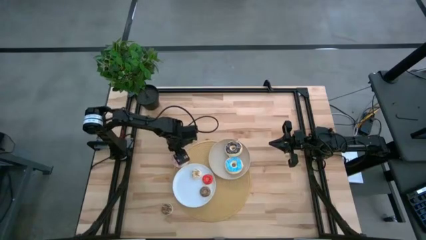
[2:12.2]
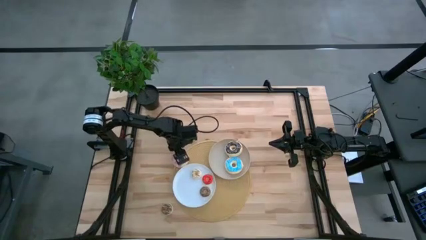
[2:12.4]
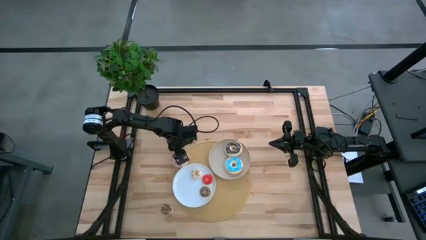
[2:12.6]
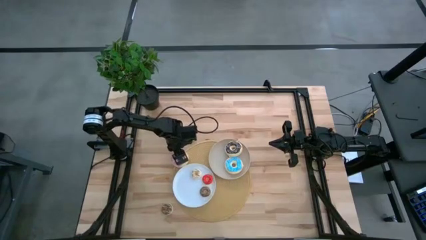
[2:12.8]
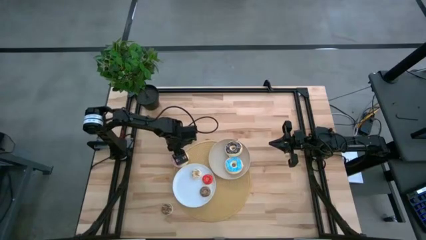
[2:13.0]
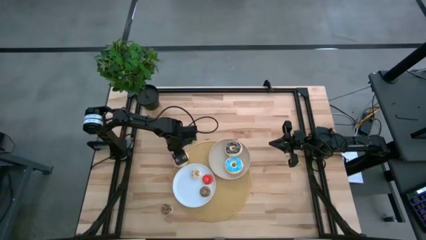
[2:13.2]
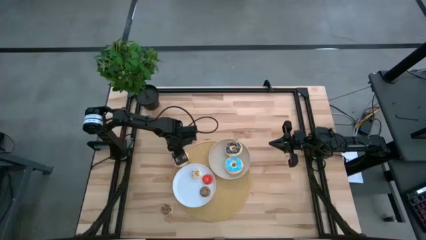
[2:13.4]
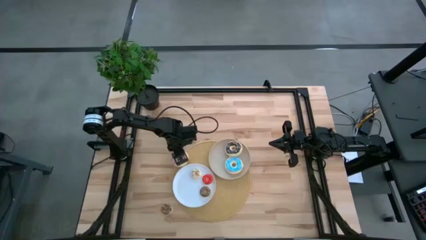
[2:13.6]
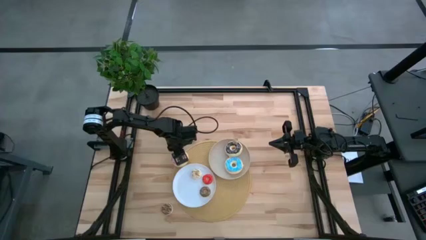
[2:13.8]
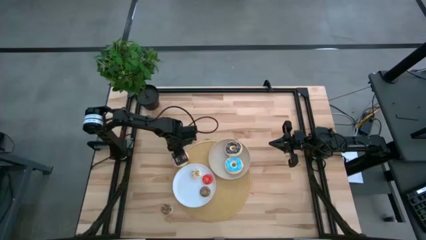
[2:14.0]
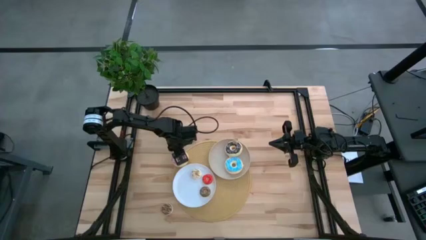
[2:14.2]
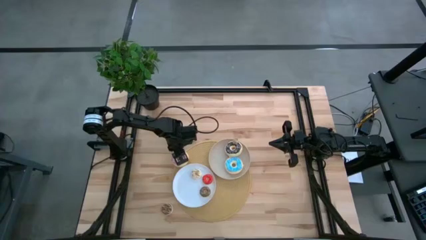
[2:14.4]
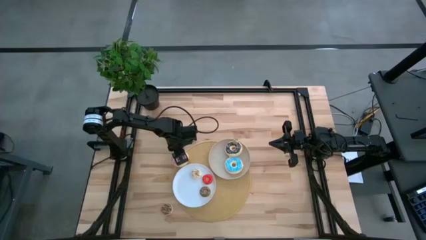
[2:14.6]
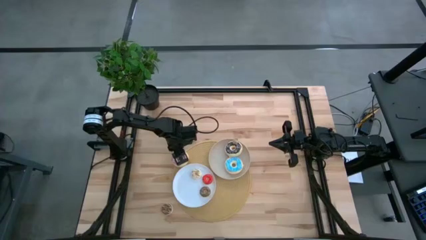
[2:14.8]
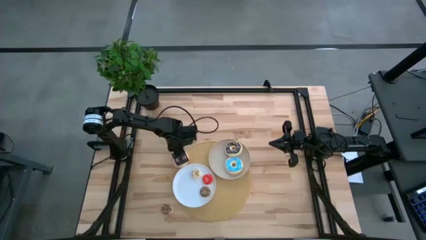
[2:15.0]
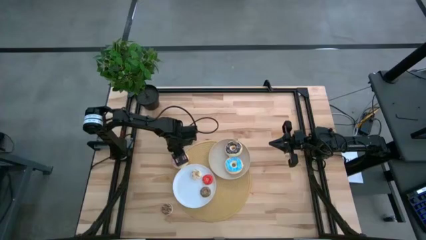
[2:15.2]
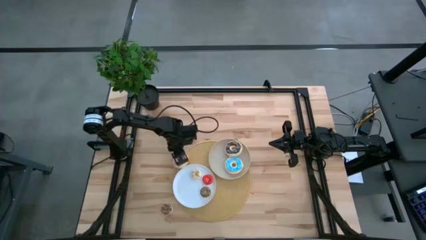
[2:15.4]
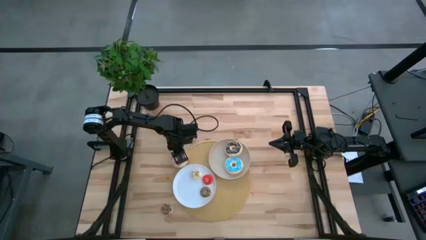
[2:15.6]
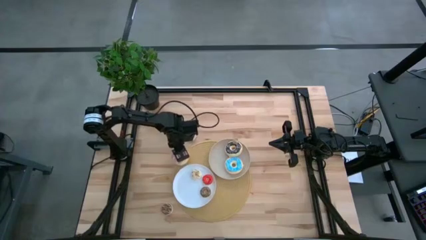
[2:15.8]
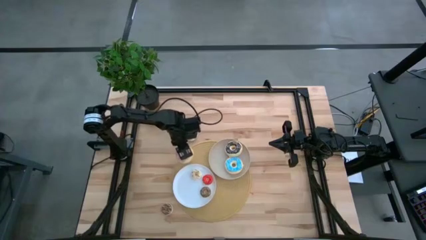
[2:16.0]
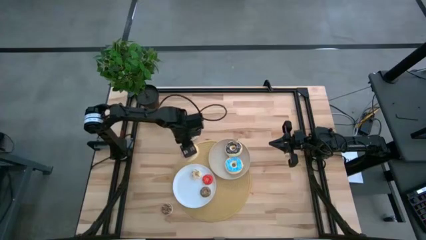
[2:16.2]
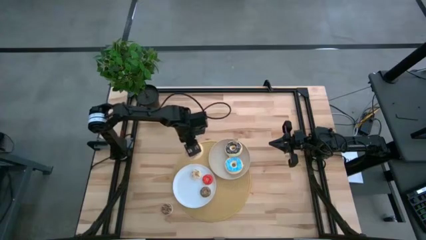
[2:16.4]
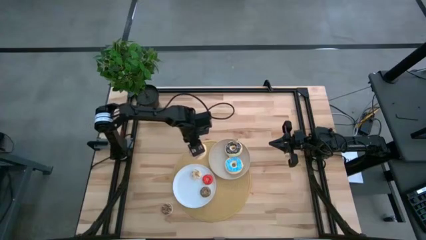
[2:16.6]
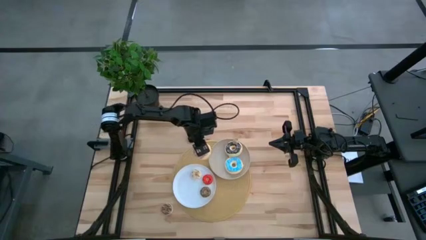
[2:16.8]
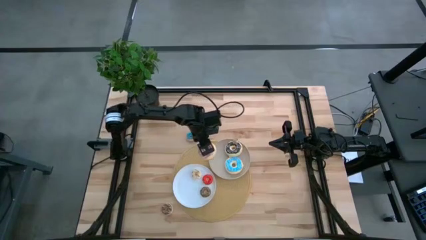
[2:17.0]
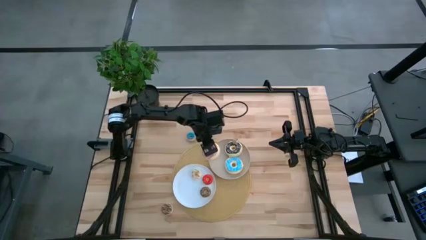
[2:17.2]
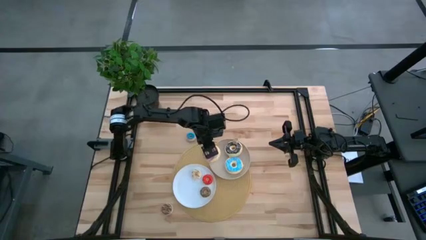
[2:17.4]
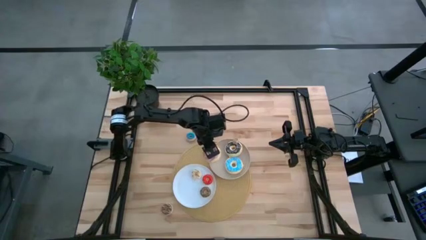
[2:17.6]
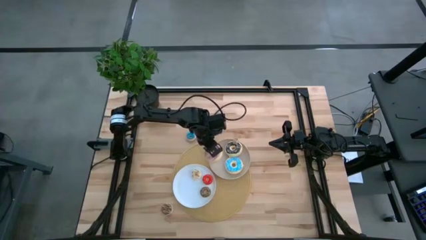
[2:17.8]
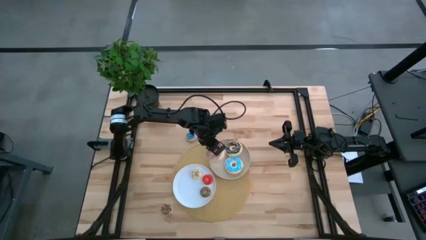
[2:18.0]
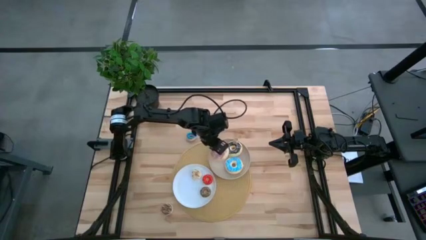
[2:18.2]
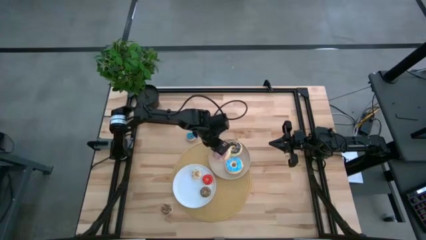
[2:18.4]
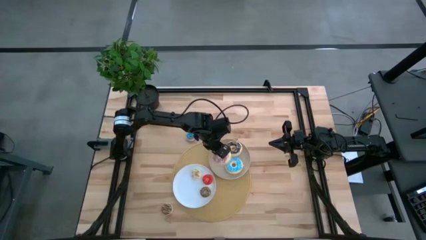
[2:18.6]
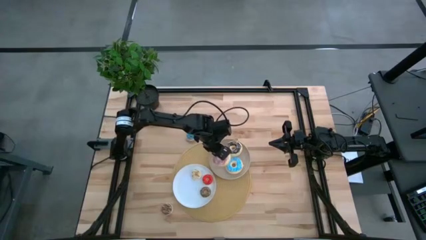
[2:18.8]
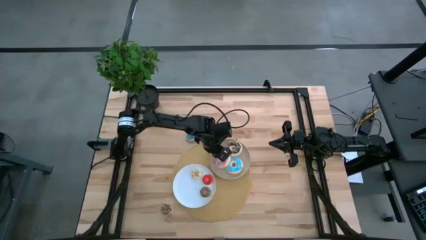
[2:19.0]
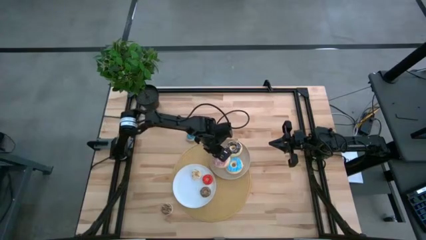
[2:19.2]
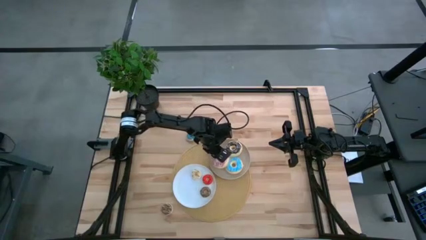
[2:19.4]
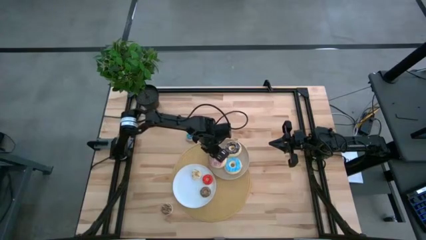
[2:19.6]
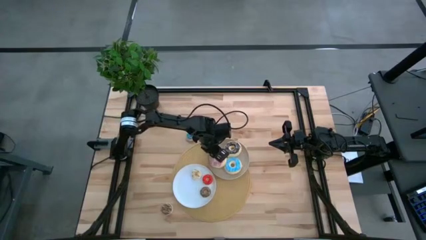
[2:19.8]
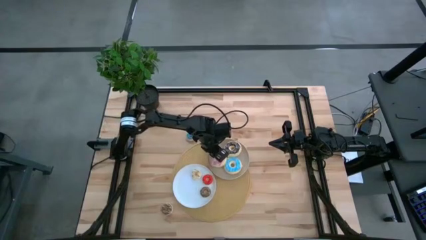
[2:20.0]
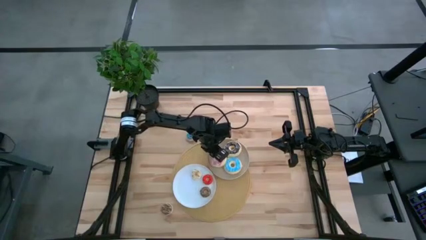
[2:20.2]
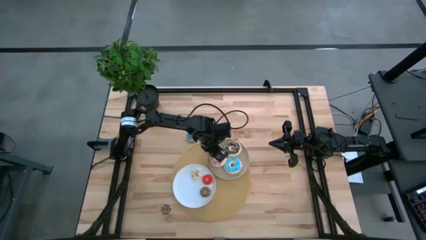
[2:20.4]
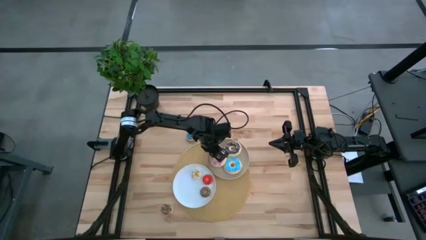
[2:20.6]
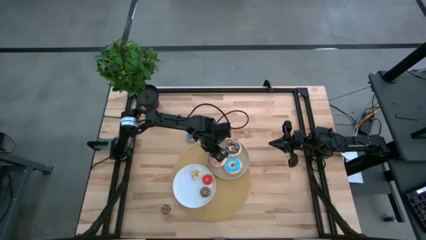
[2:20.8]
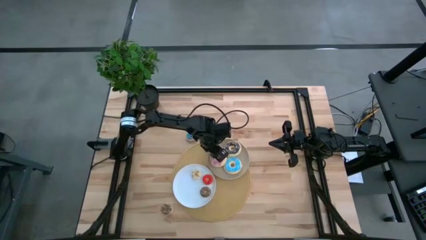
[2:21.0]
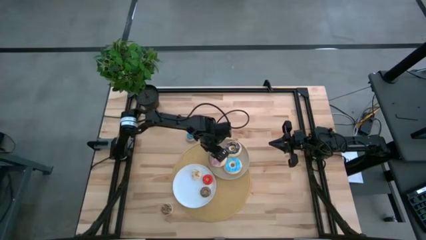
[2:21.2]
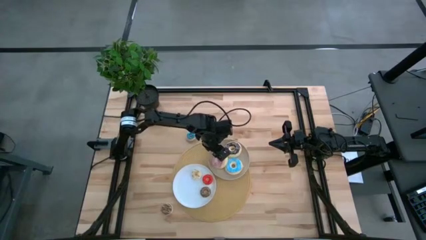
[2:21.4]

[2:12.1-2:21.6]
Task: Pick & Place donuts
Put the large pink donut on the gray plate

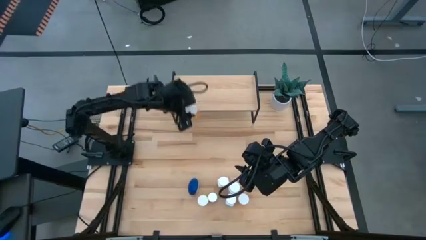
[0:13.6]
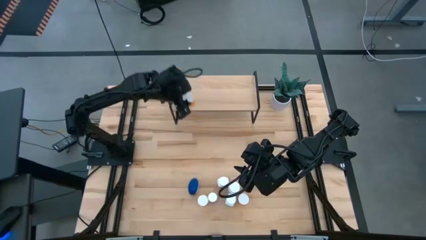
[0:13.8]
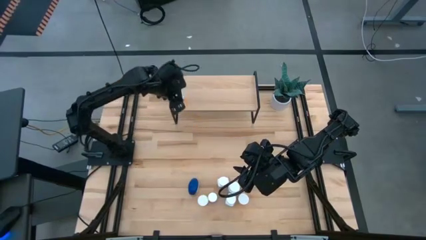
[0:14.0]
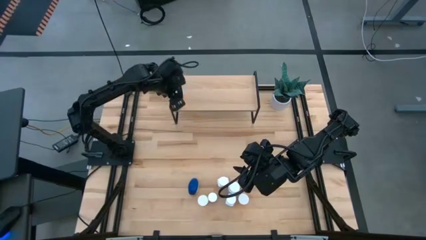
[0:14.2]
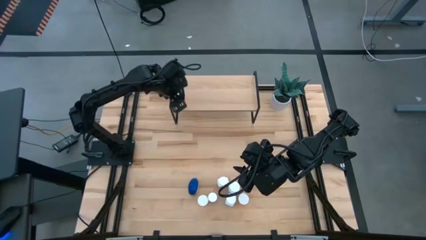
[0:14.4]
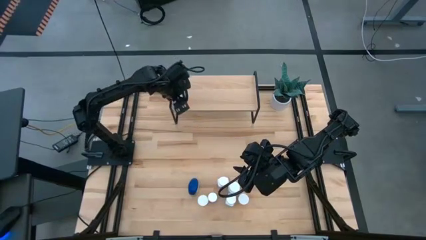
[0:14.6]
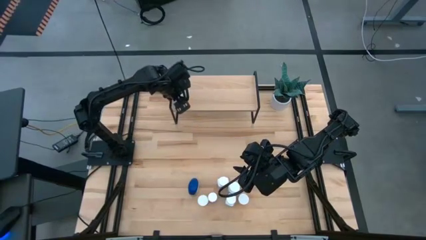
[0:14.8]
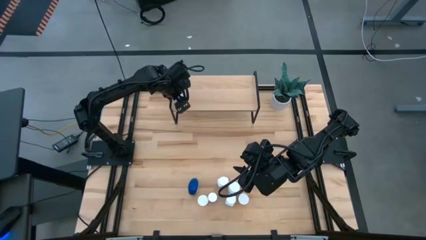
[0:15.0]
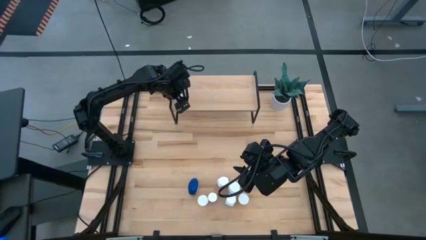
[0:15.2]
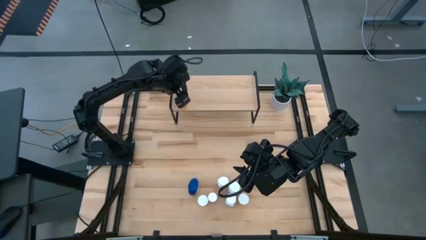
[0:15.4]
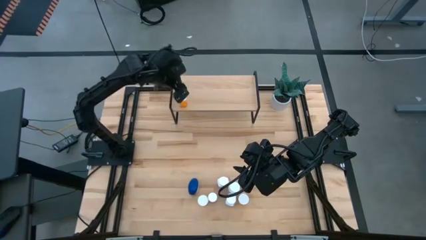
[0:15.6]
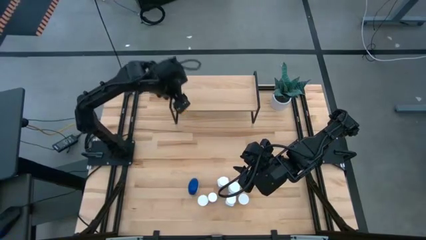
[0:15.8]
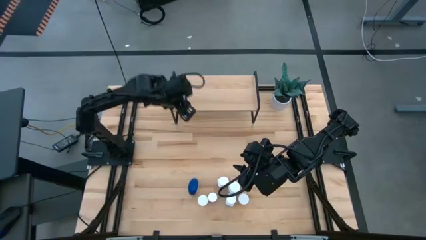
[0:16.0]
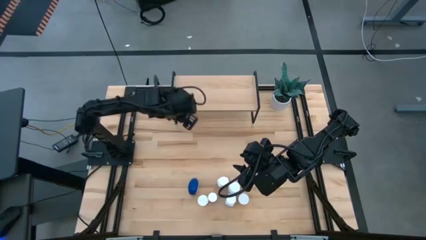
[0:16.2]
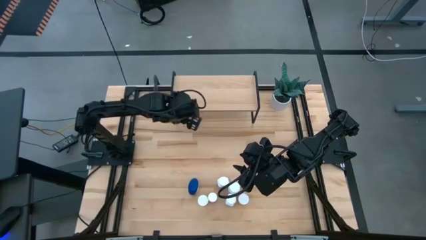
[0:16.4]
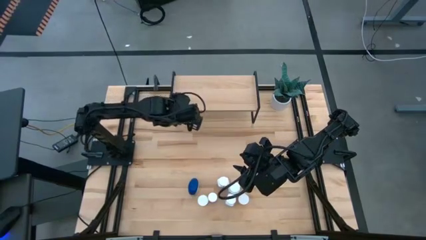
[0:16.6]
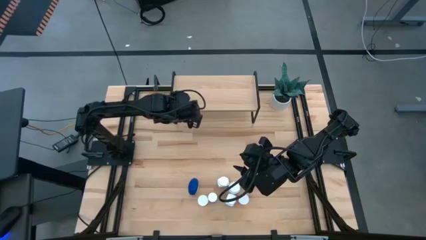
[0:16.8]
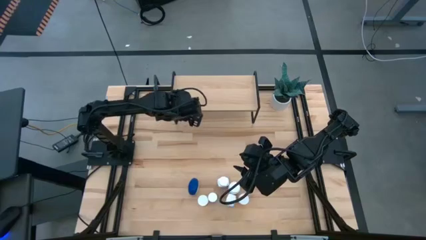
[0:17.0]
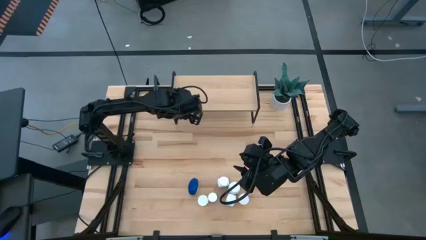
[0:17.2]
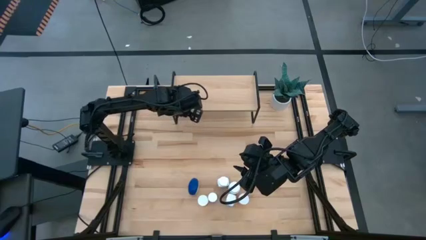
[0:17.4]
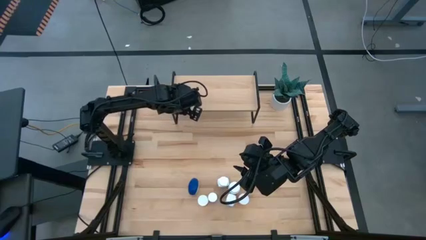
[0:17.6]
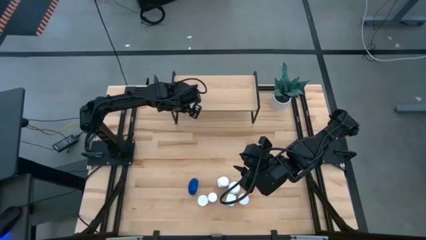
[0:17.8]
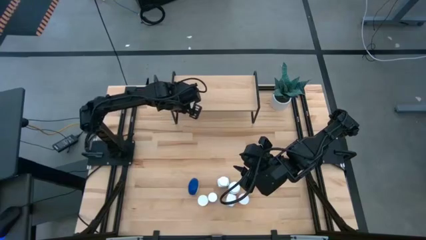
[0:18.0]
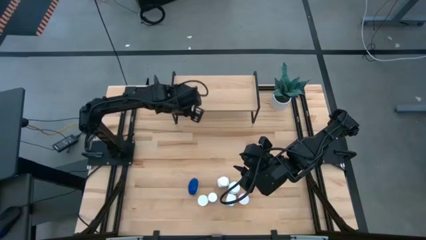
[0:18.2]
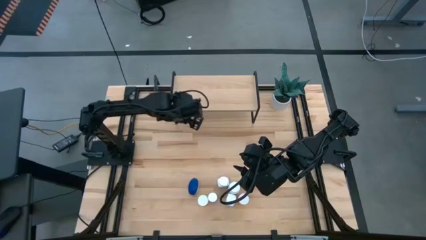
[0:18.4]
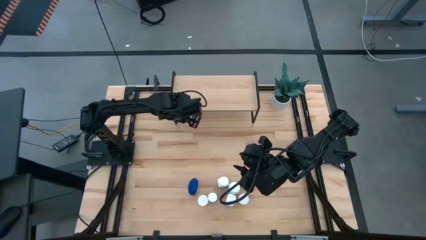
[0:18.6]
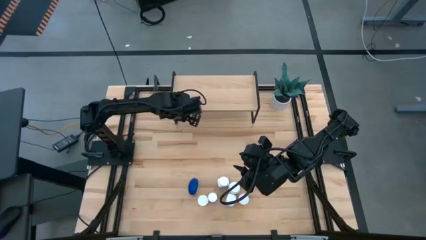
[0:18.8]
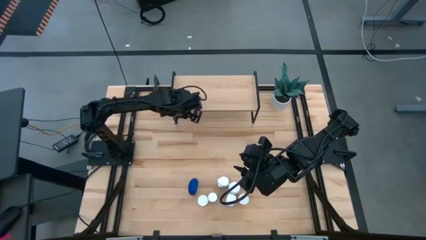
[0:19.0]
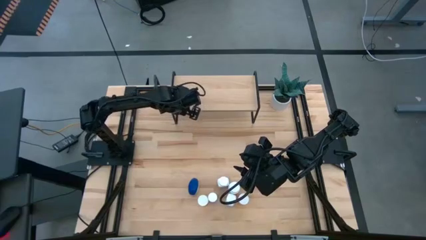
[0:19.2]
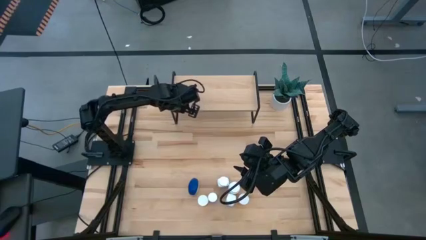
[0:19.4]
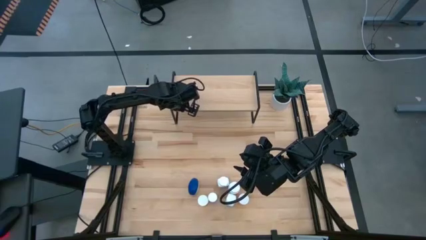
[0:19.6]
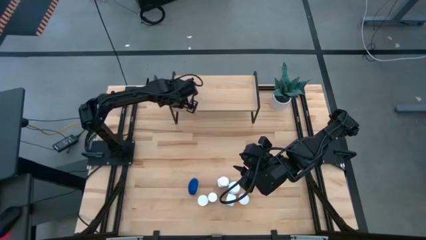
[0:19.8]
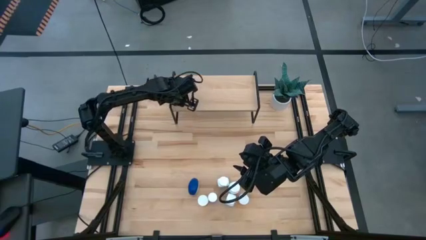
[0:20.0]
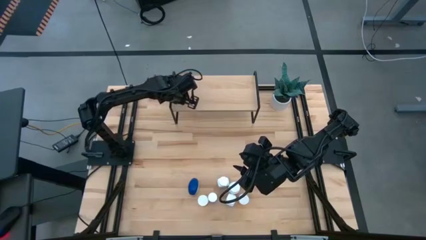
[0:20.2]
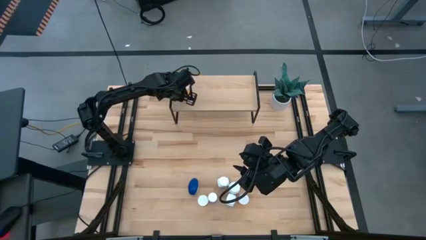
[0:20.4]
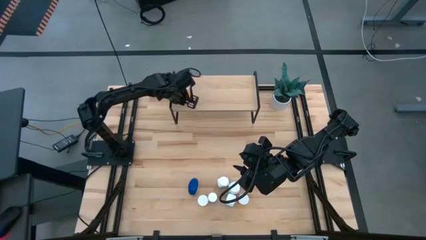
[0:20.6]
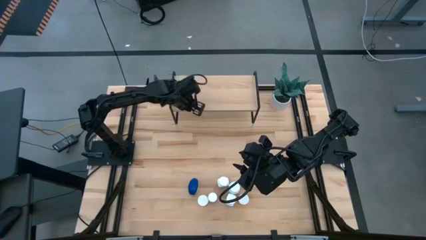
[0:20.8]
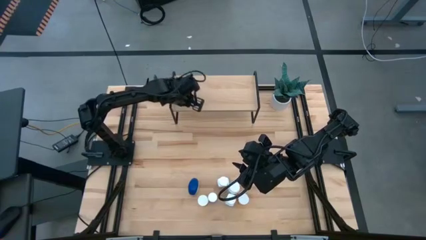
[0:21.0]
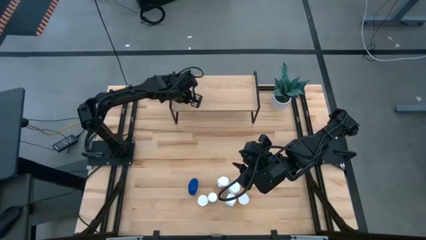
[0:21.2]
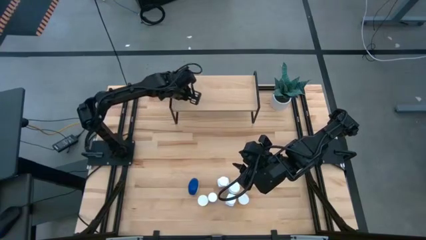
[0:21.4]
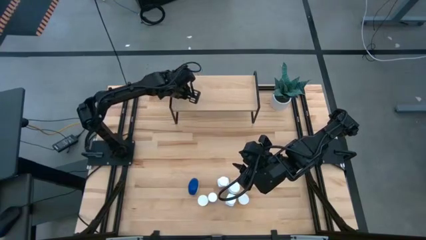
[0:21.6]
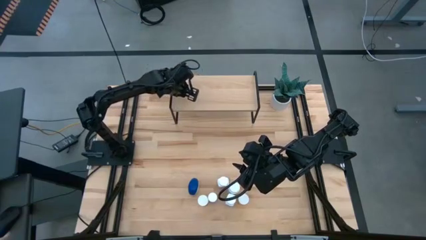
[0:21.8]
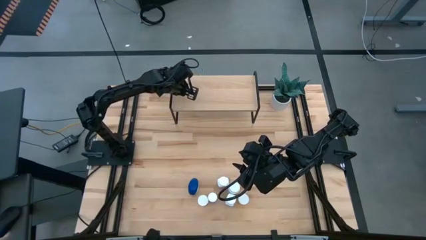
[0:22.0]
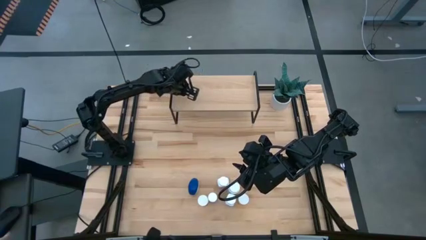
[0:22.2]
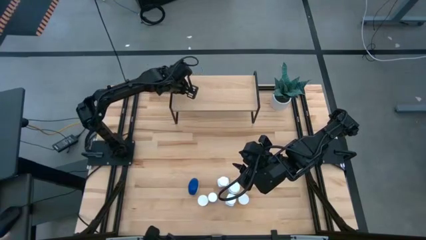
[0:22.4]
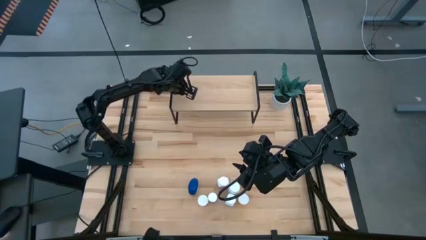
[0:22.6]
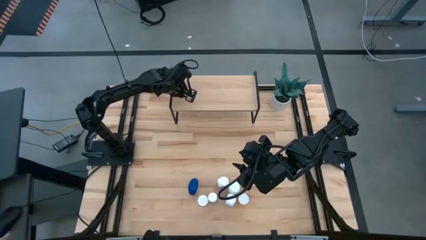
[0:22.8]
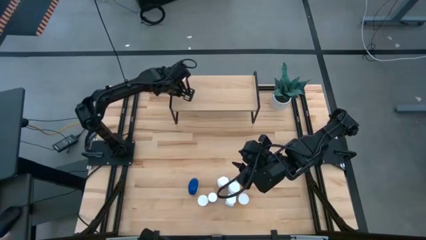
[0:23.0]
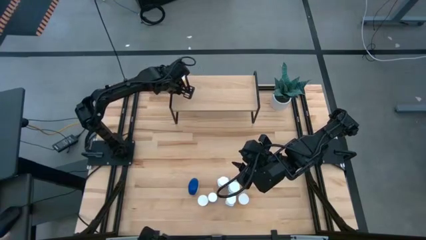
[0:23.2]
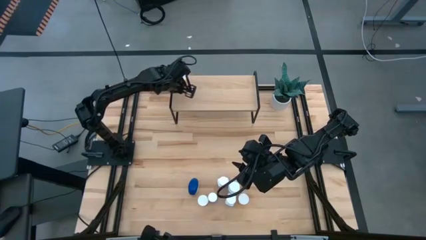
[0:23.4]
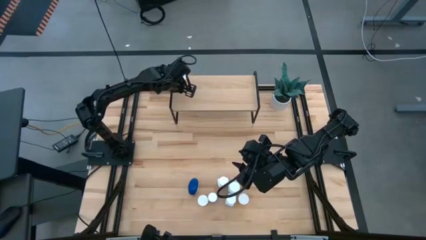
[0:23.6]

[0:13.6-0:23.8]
Task: Pick and place medicine bottles onto shelf by color
Put the top orange bottle on the shelf
